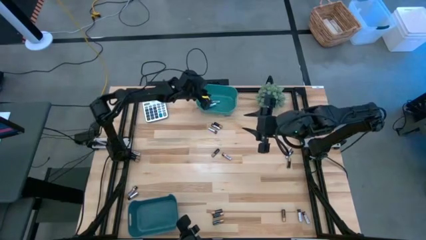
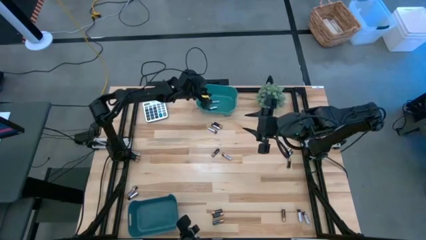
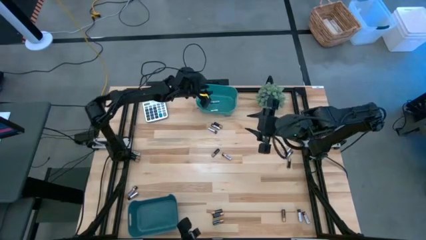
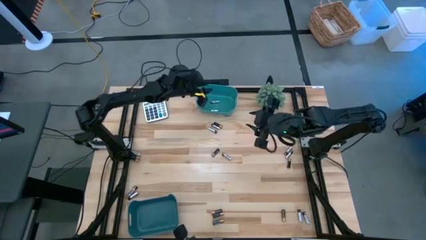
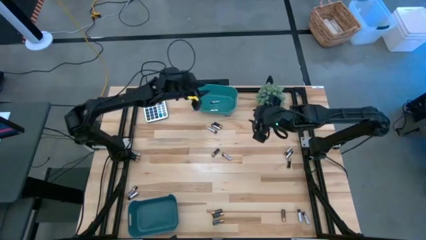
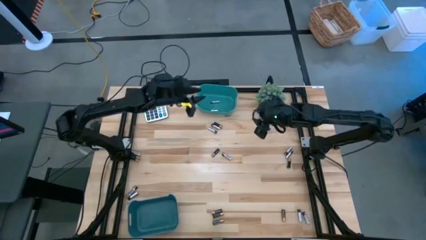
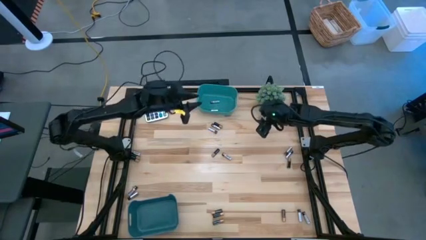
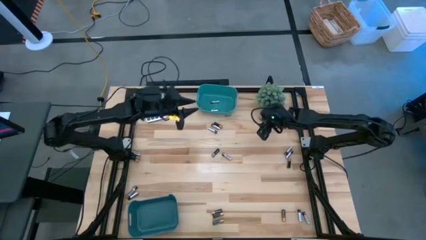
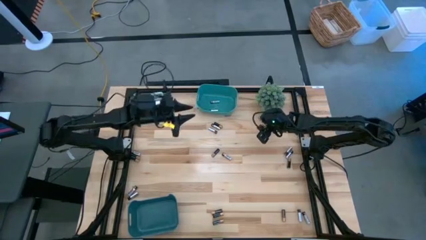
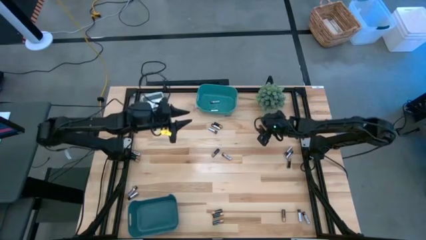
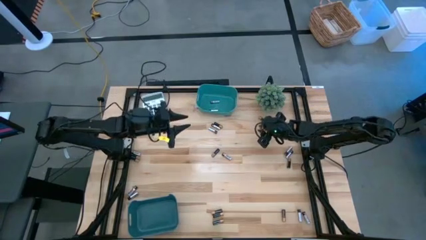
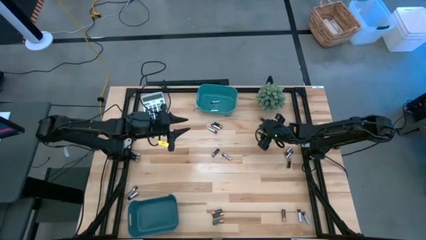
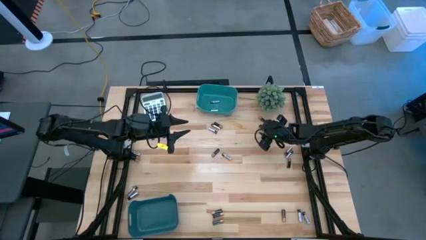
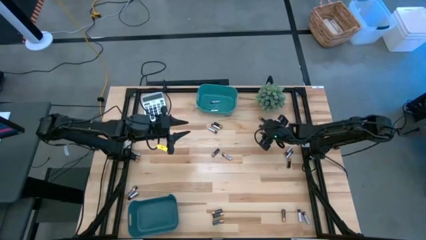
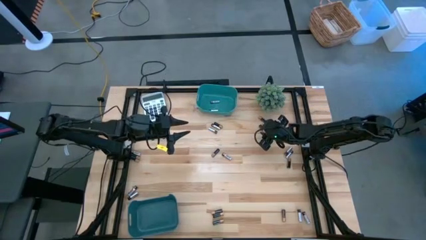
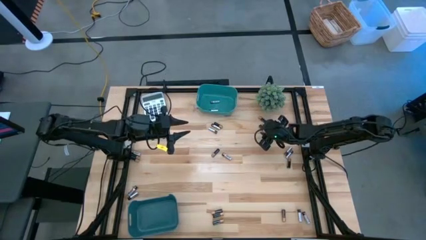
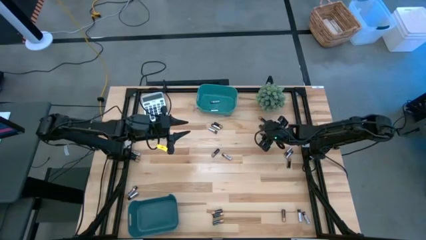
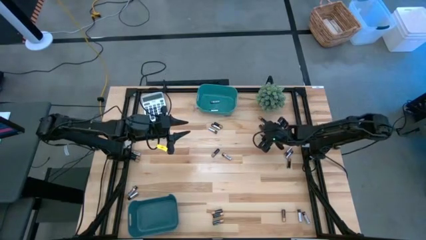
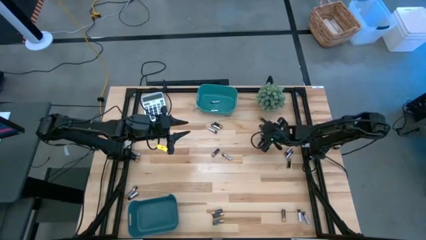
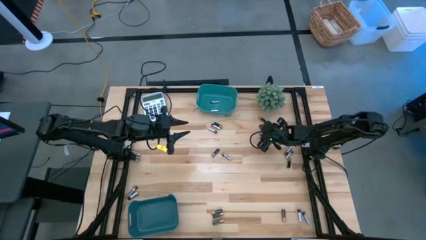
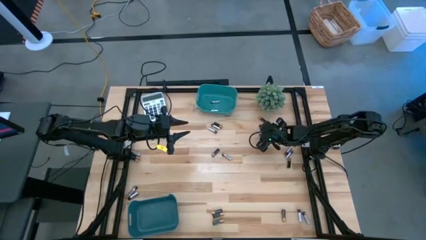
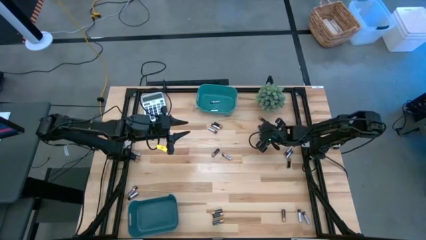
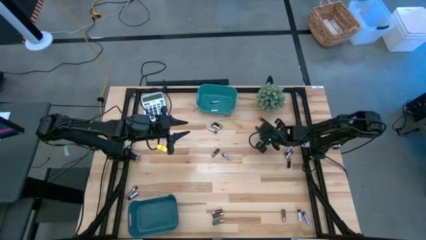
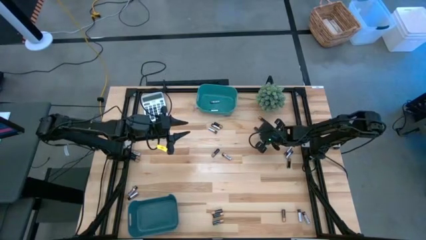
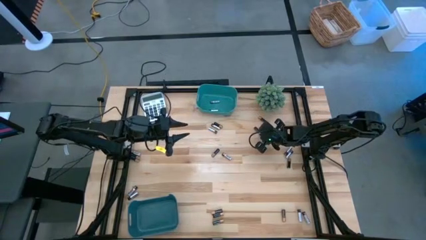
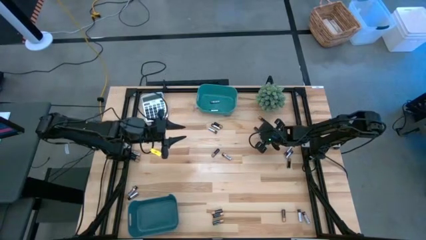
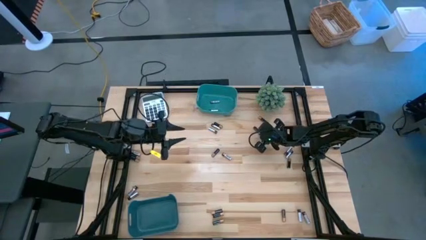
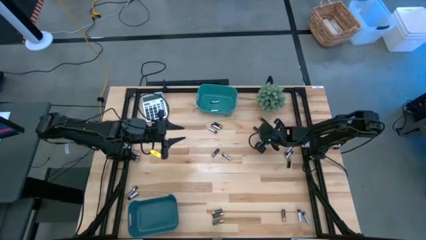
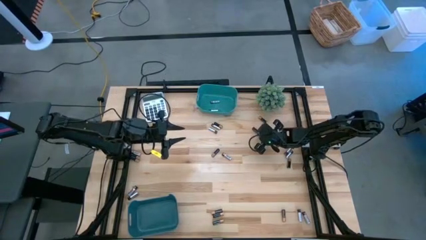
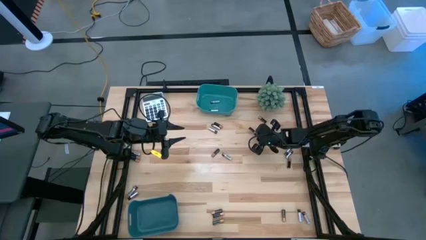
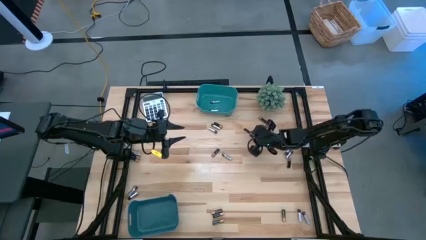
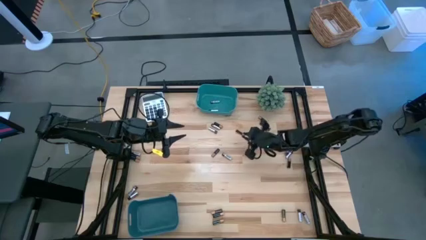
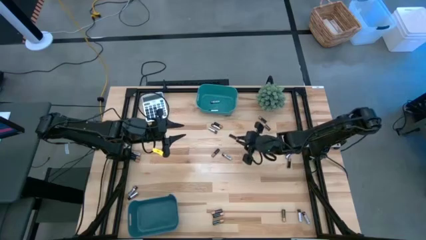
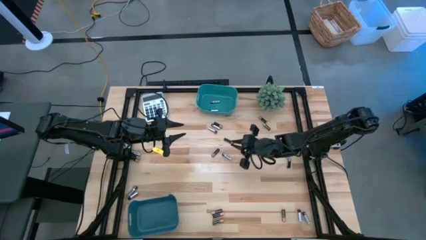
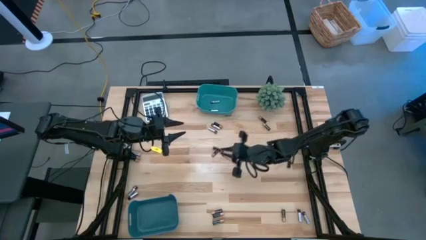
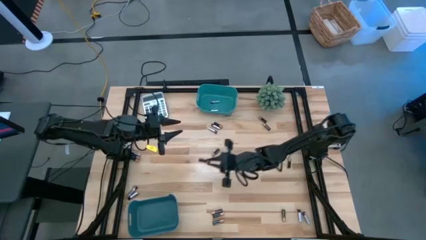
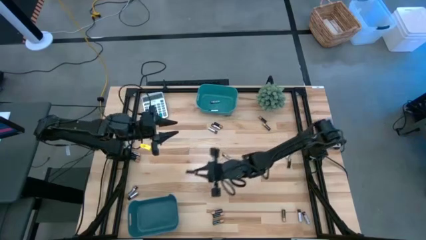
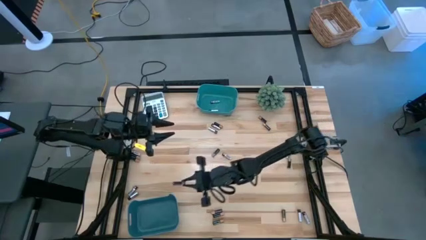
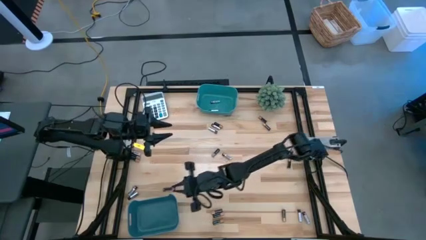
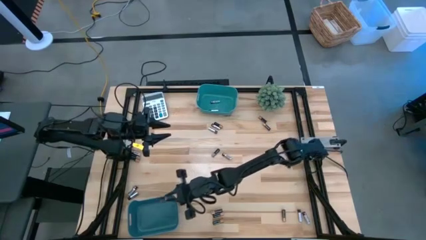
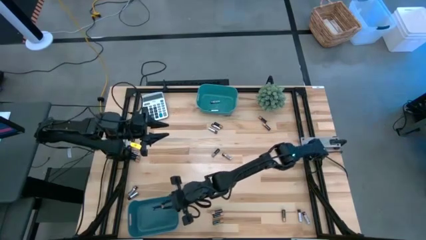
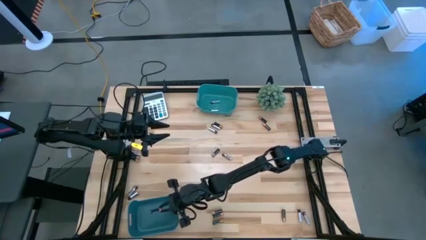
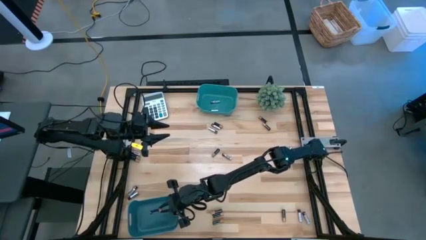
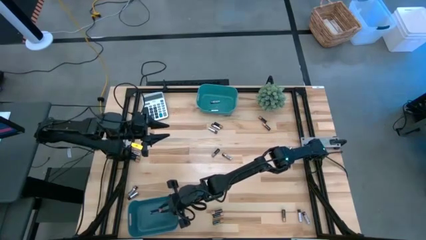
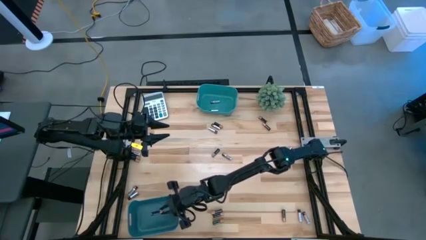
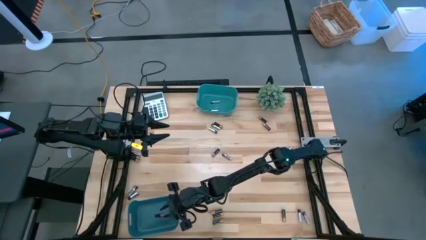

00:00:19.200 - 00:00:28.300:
Task: Sort batteries
Put the gold battery into the bottom green bin

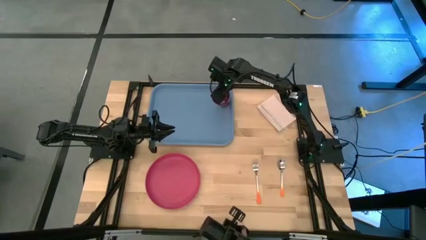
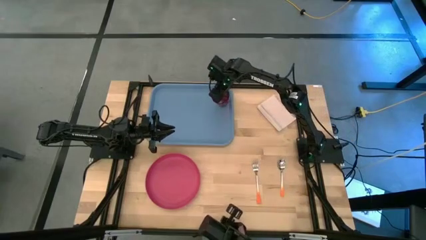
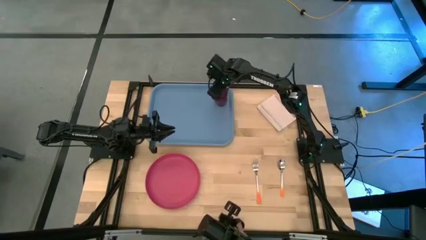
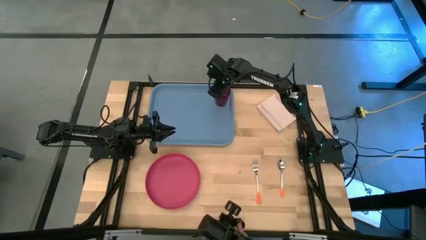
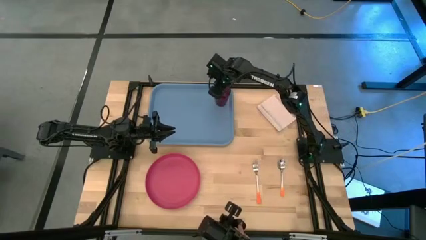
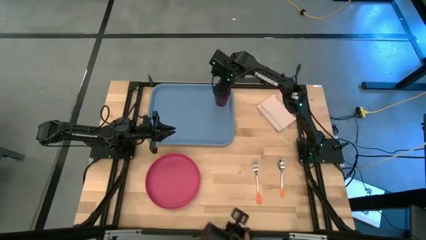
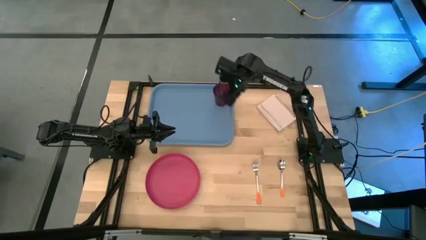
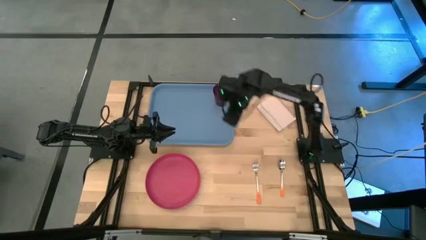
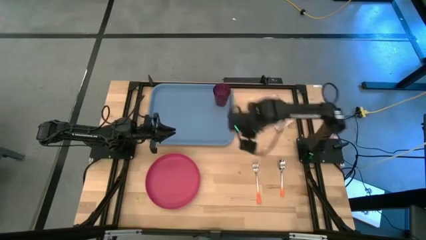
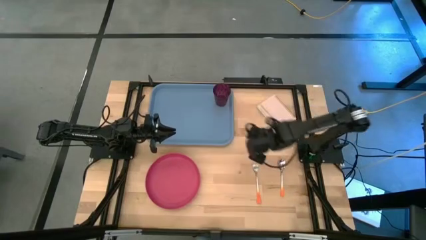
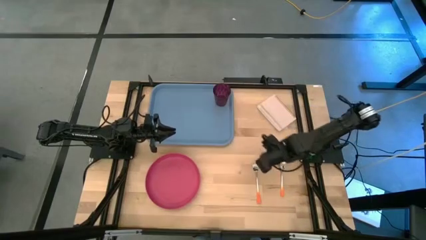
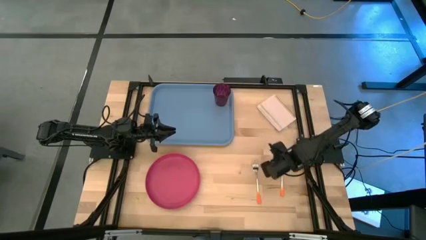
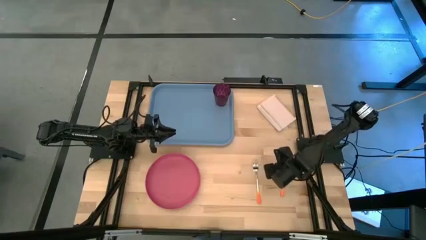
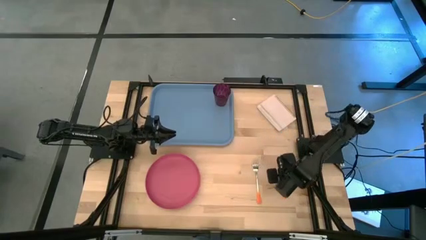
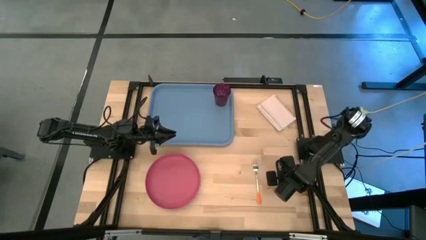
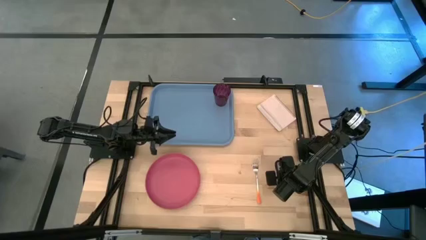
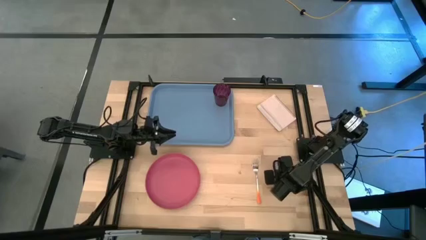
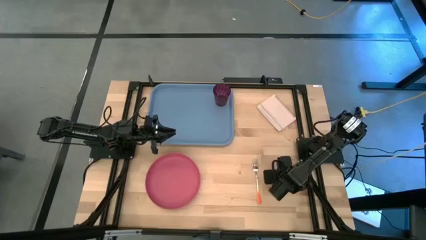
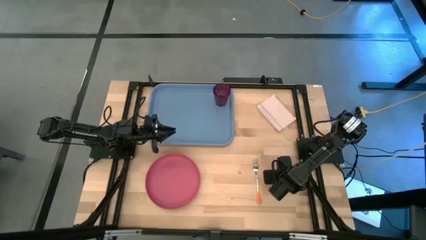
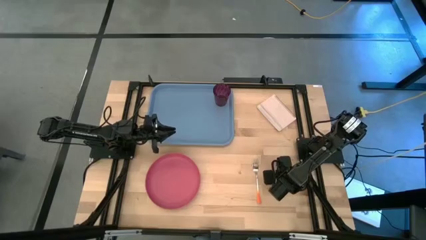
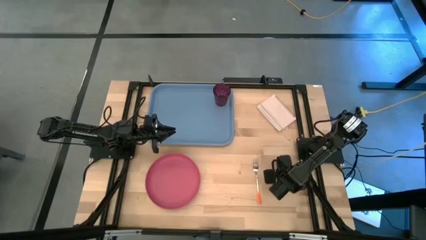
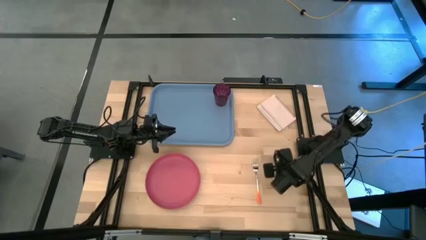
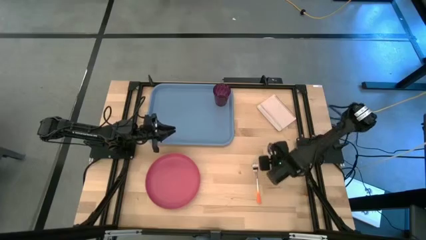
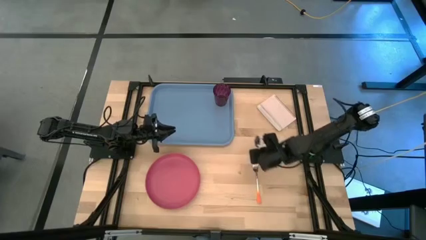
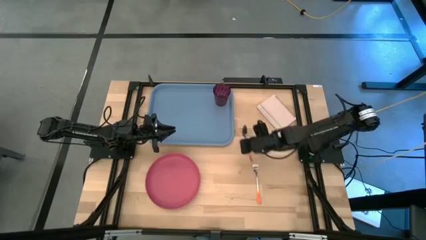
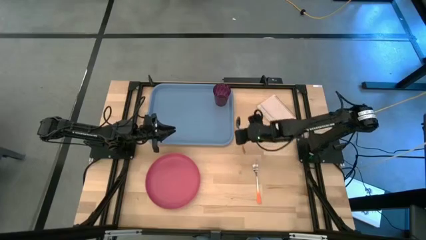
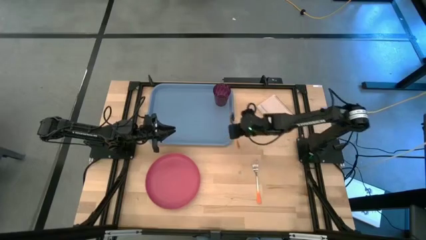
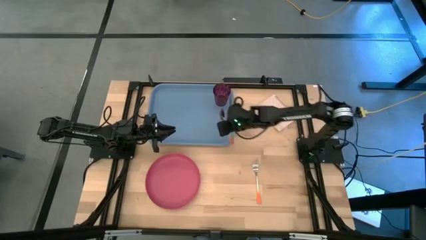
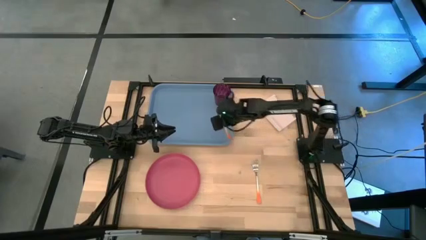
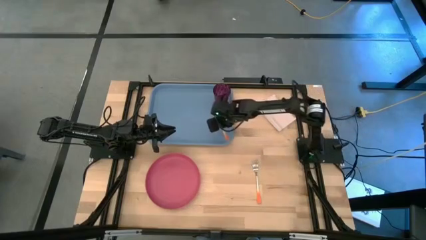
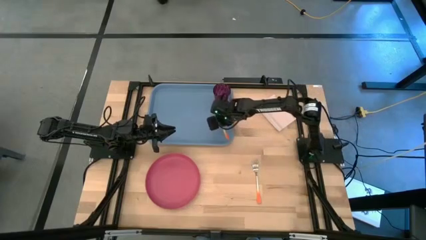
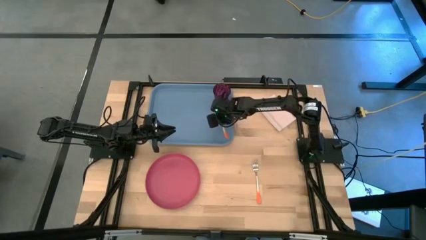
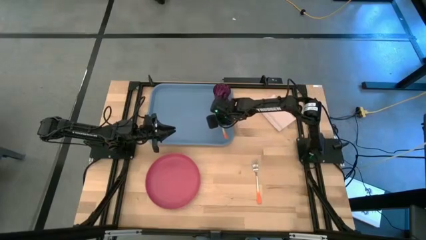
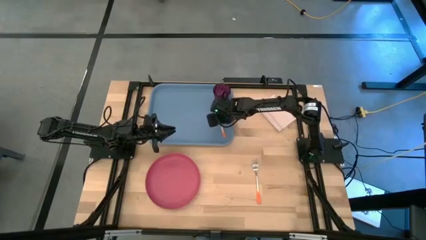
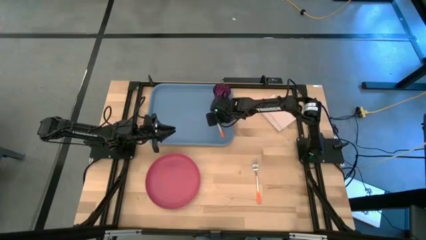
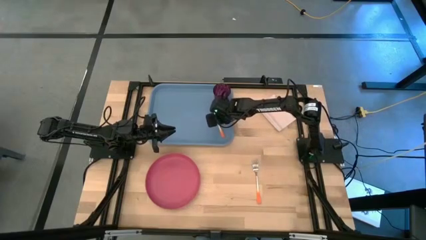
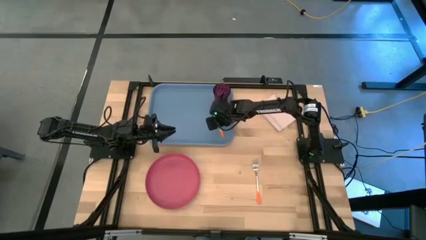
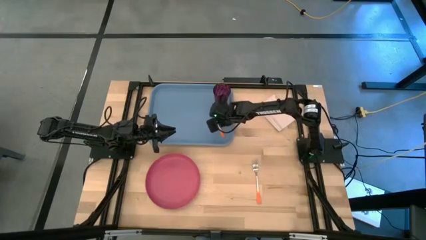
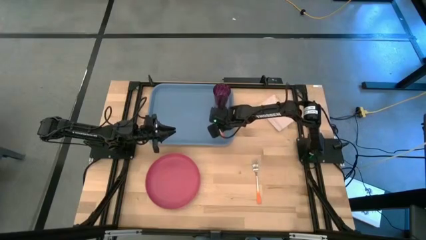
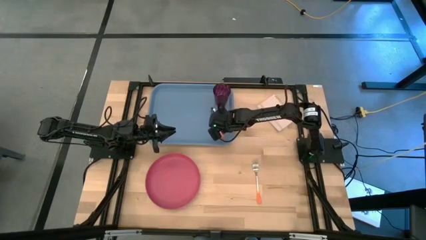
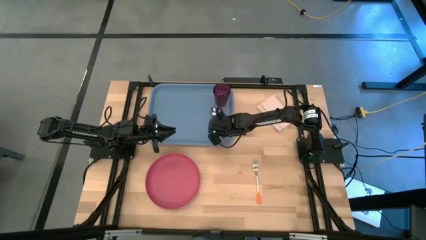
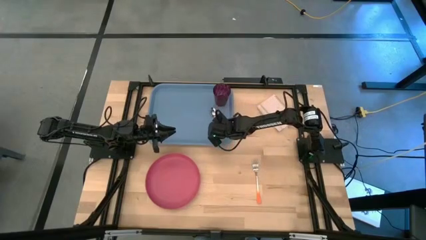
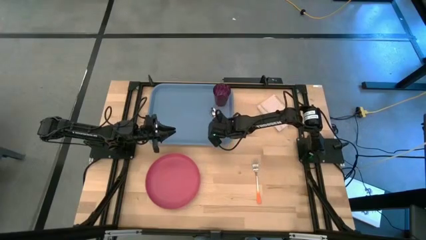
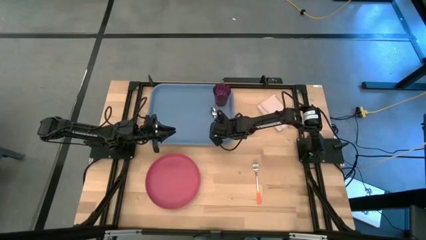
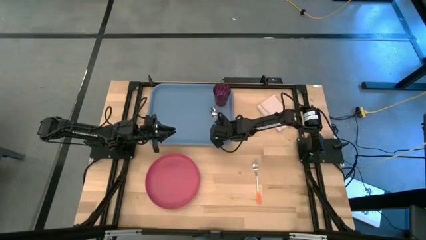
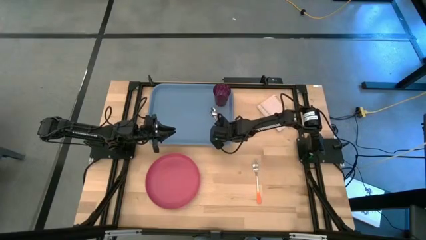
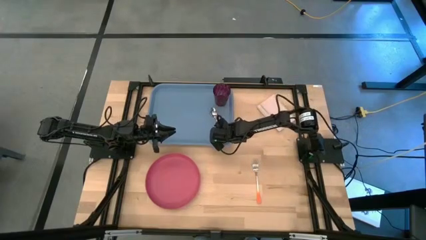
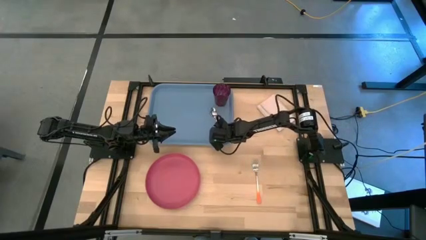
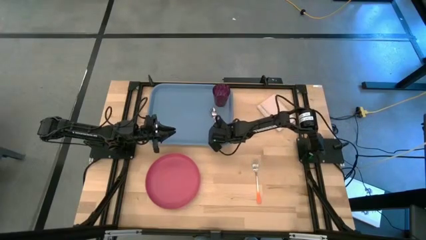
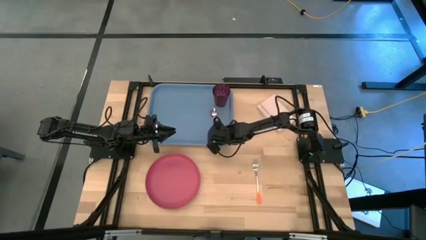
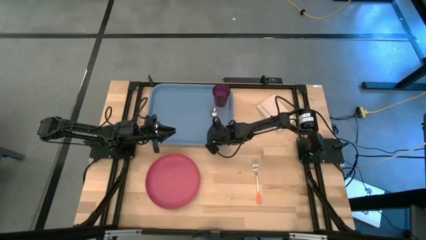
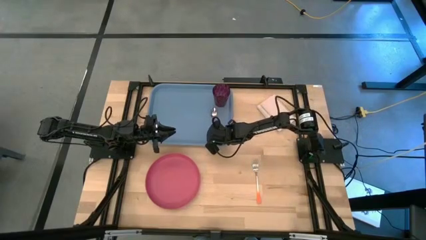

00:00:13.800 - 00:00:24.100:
Task: Pick and place plate/cup/fork/spoon on tray
Put the orange spoon on the blue tray
